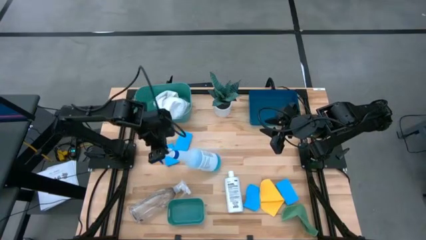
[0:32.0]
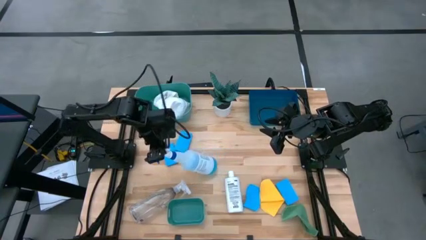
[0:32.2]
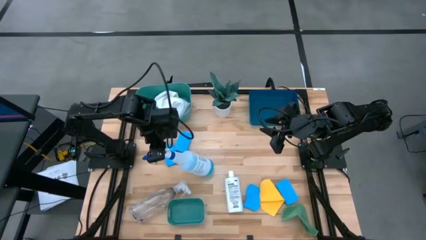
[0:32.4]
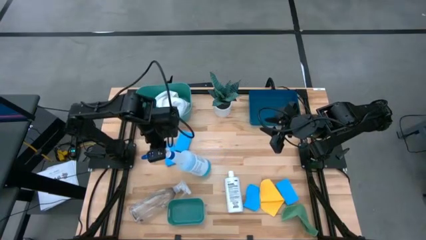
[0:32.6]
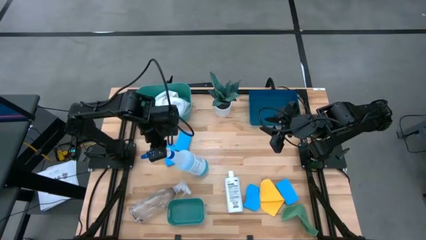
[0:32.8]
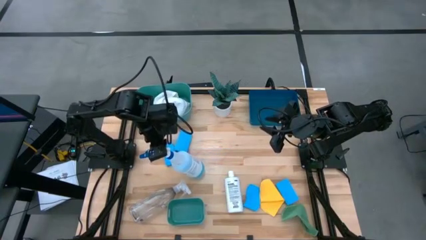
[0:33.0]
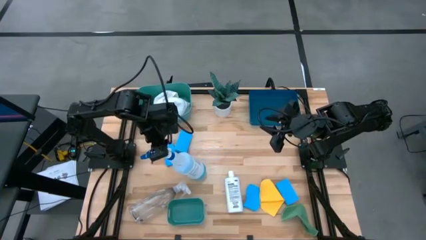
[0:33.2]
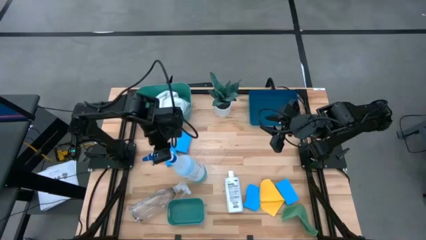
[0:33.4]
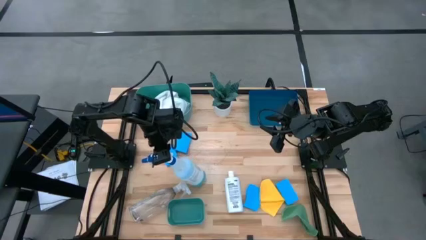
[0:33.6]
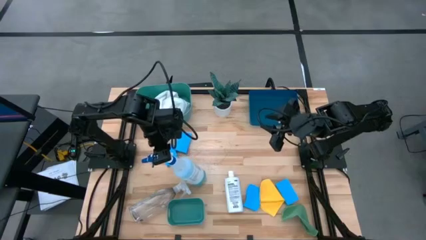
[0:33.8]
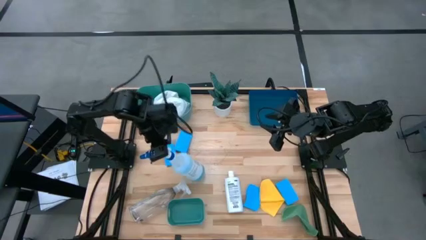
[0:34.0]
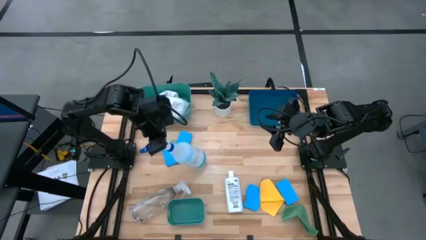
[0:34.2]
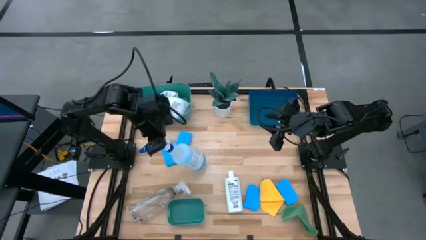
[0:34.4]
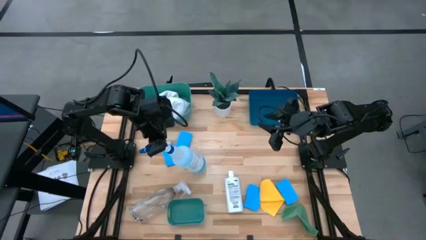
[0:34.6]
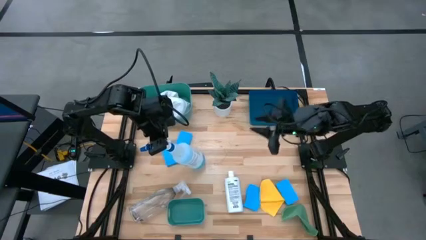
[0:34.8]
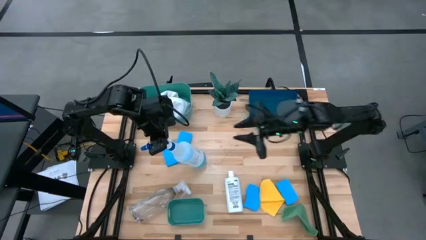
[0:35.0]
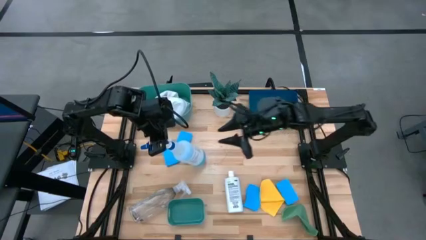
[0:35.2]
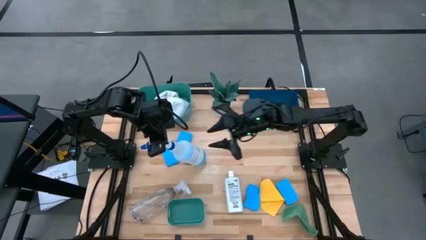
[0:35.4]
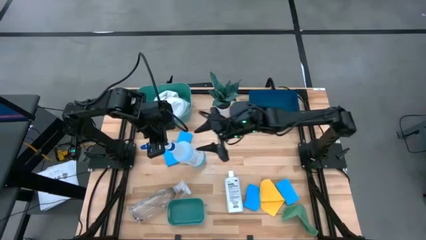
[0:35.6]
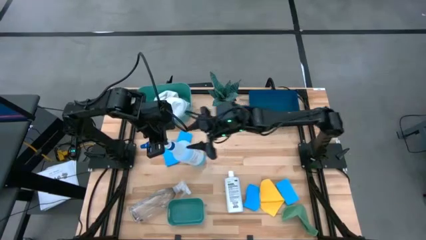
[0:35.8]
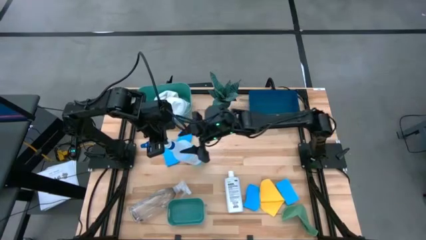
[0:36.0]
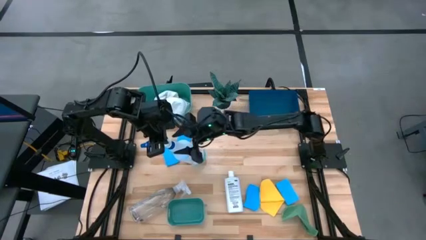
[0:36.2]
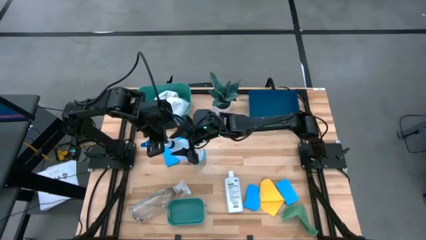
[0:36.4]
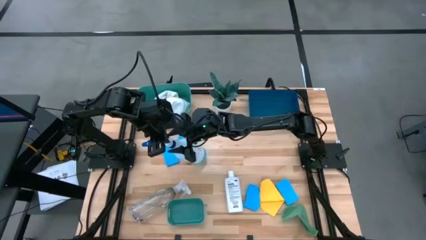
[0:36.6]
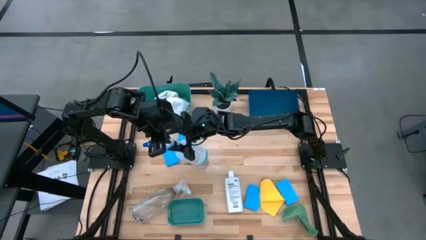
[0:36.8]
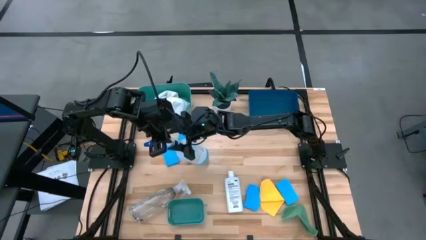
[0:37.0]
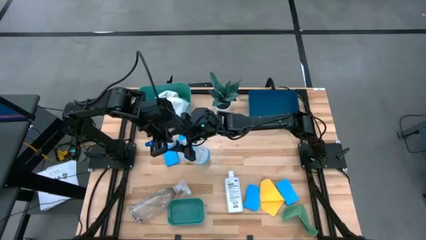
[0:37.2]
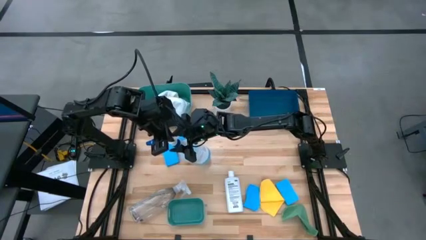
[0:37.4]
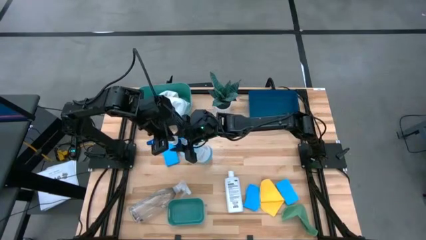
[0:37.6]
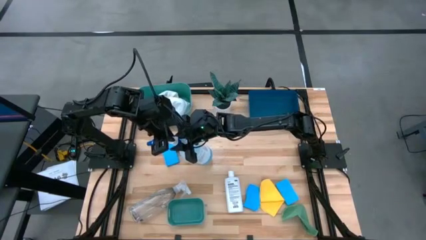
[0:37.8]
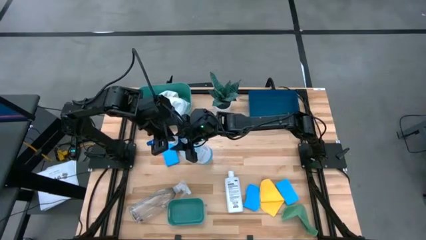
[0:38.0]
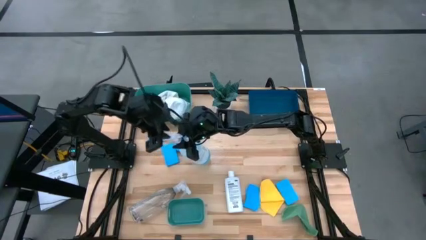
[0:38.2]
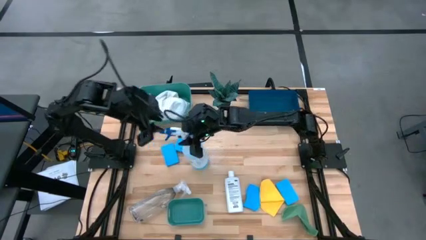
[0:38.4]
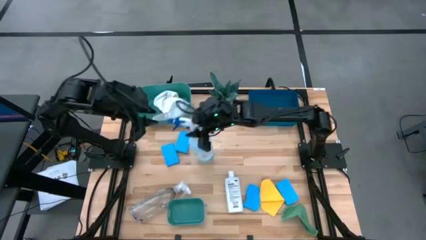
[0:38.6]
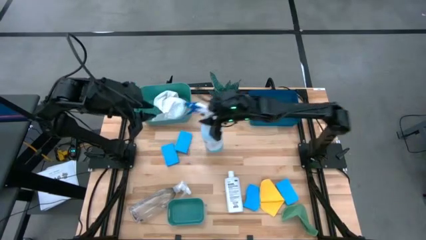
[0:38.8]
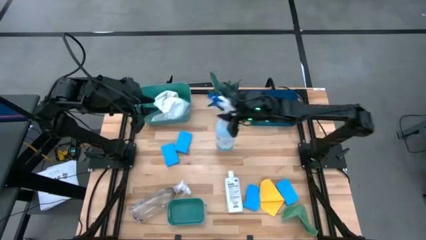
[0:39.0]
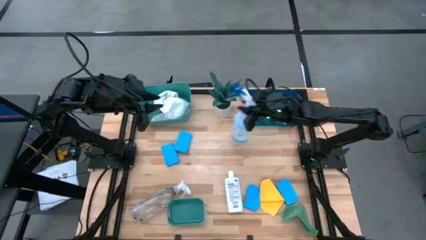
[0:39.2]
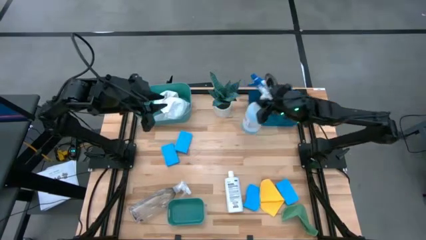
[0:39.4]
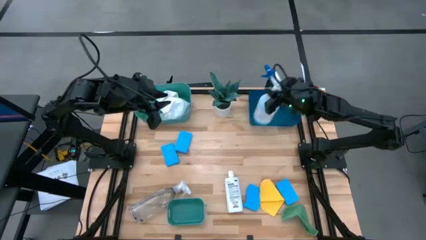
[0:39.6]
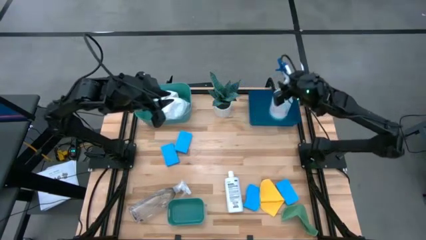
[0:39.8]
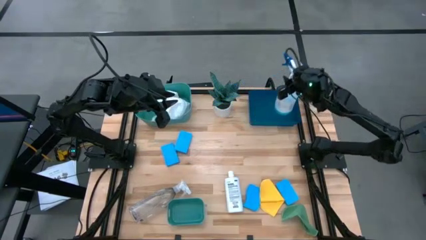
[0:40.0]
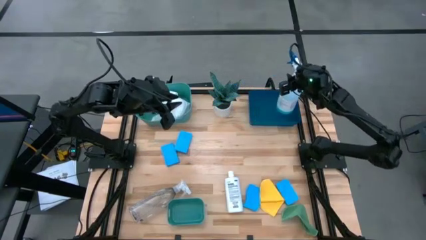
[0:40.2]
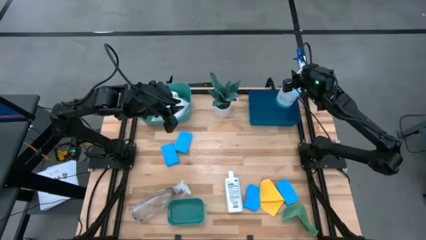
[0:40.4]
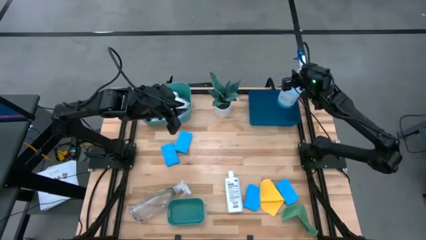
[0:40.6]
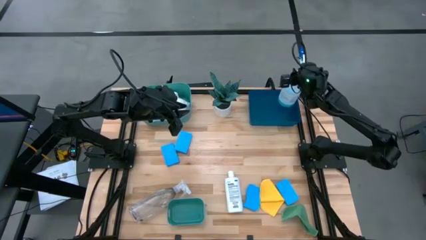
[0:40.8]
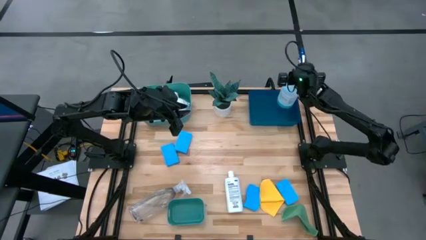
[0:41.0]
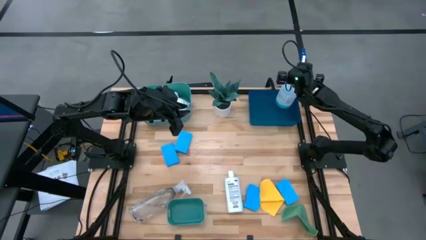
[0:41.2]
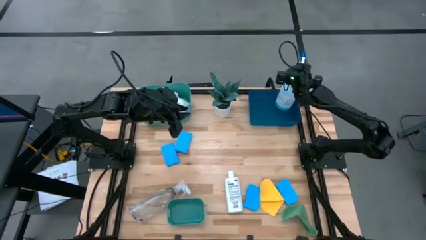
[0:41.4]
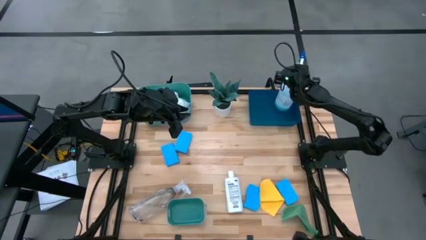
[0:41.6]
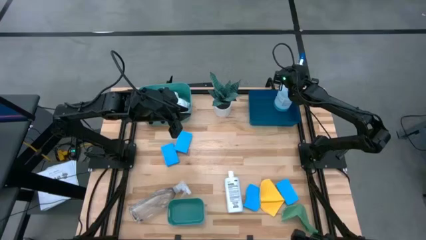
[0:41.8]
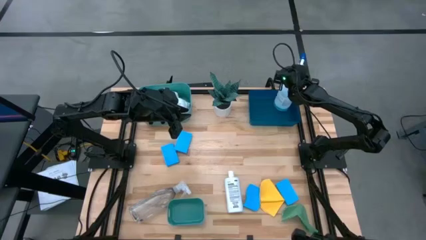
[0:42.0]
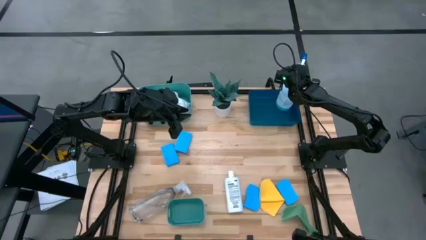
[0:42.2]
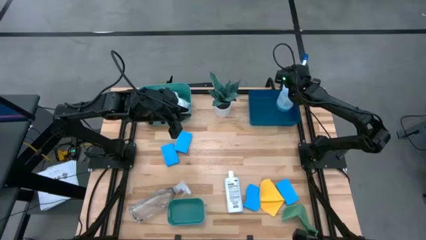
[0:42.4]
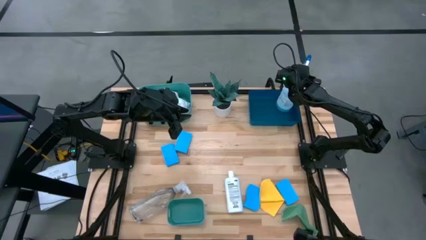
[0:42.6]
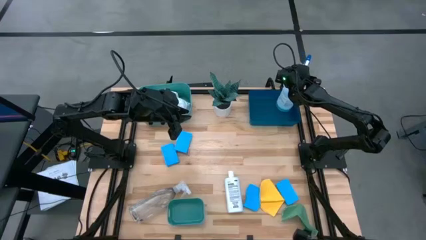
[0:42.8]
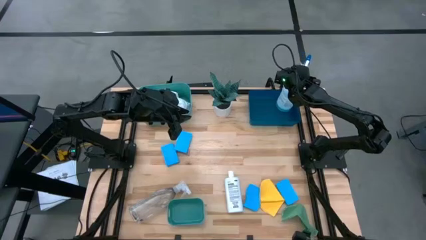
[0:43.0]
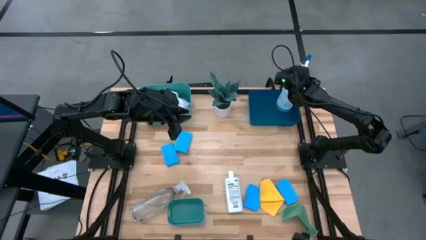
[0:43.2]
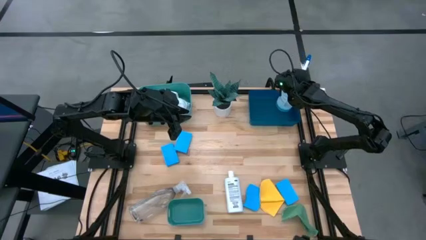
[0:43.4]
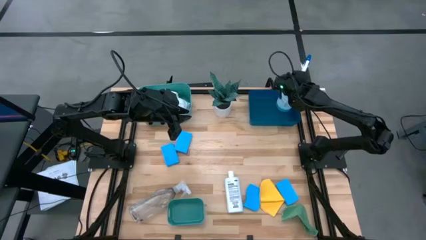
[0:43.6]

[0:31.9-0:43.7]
Task: Pick & Place Kitchen Items
Put the white spray bottle into the blue bin

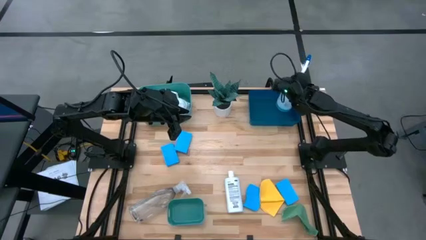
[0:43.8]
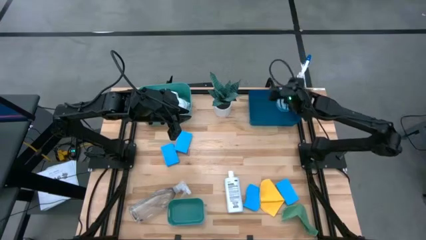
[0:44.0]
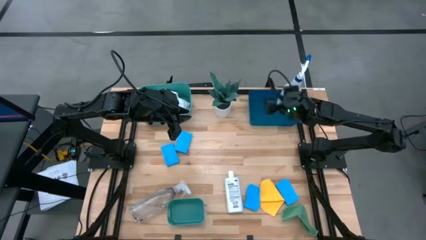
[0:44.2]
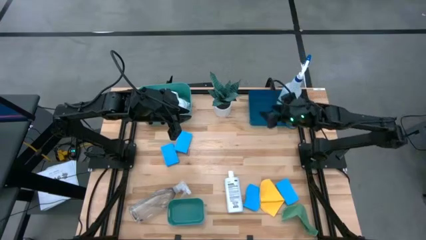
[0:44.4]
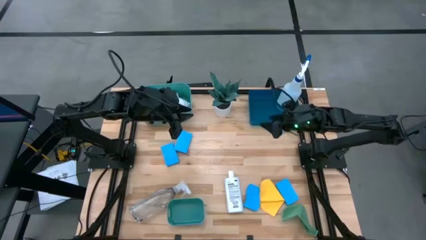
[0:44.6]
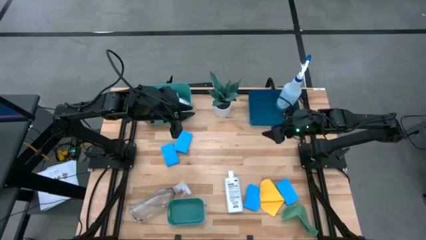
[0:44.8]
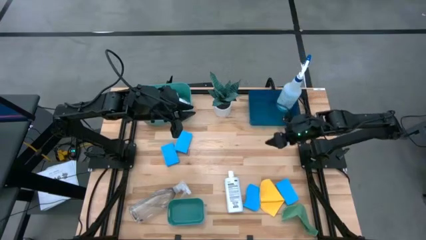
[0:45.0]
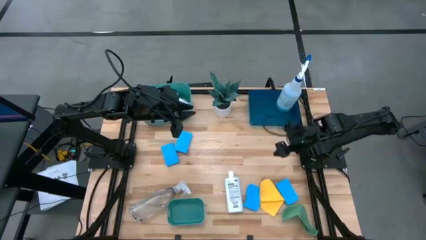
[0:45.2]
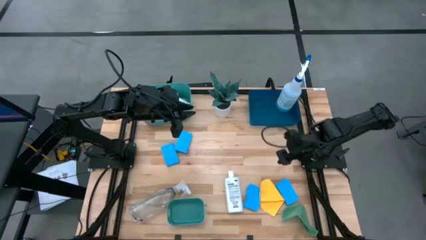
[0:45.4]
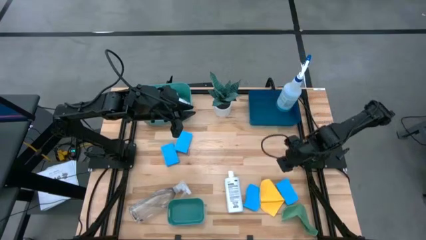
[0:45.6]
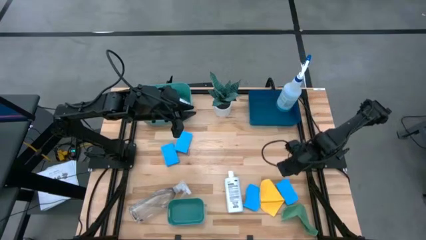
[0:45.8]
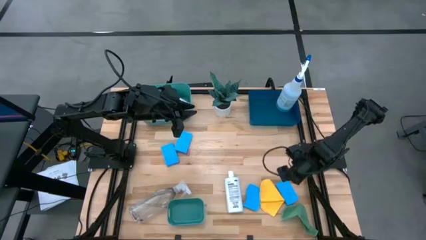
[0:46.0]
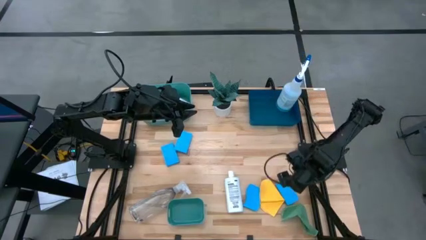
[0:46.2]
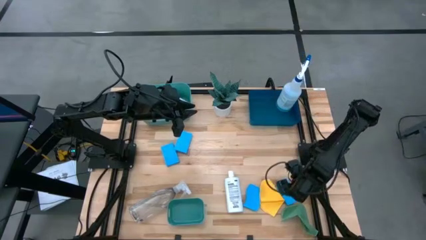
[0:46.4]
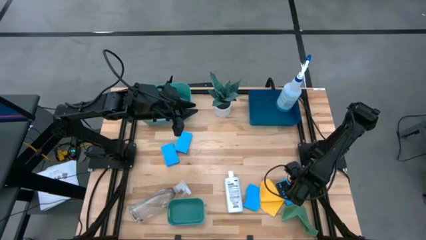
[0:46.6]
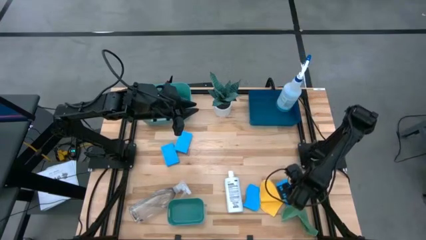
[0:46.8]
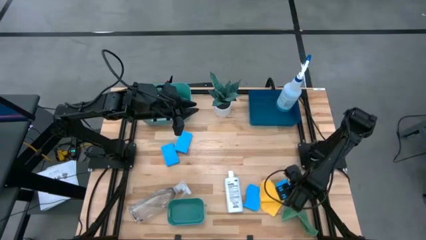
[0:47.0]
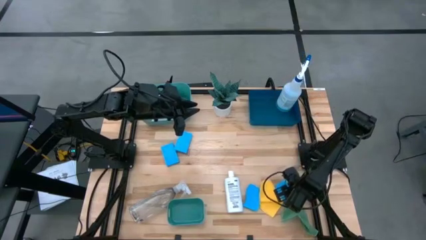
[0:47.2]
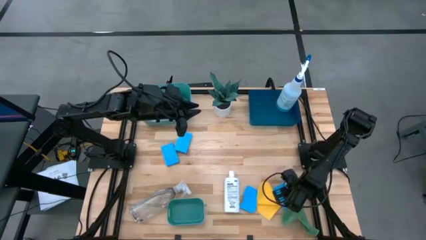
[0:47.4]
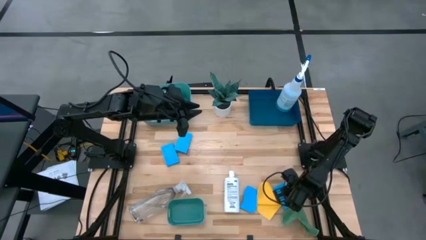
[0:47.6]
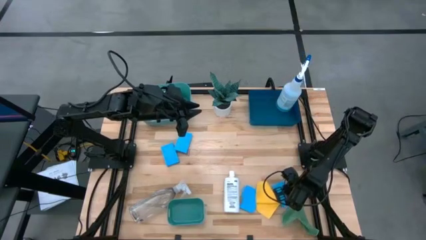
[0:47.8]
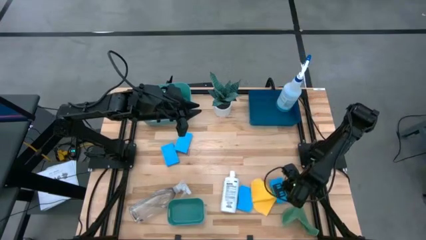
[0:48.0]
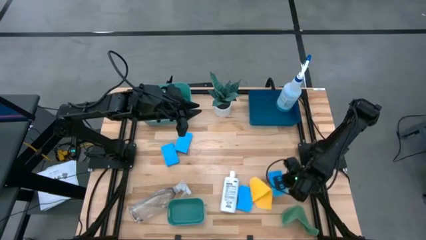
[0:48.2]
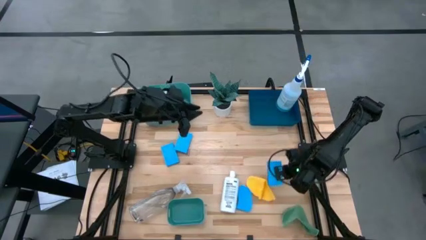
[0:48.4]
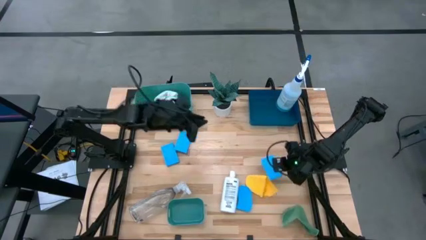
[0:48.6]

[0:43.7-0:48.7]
Put the blue sponge into the bottom green bin

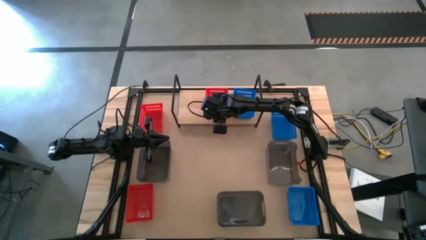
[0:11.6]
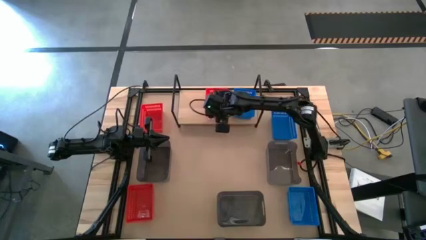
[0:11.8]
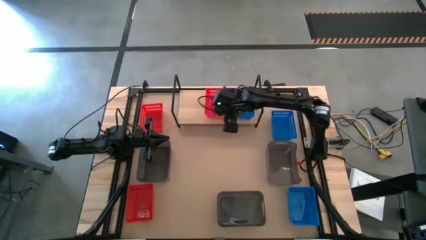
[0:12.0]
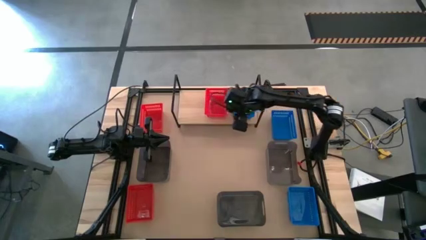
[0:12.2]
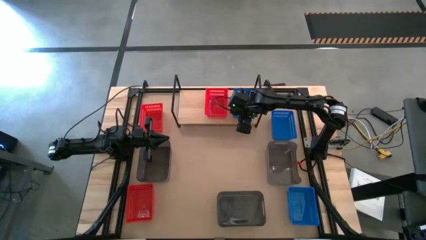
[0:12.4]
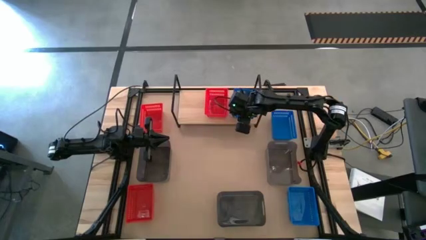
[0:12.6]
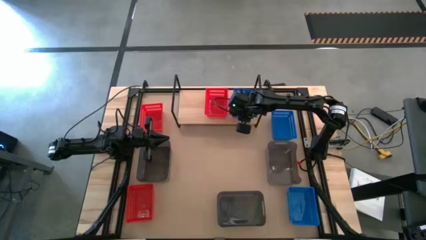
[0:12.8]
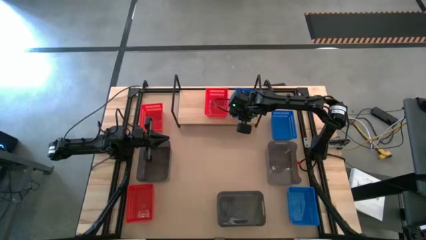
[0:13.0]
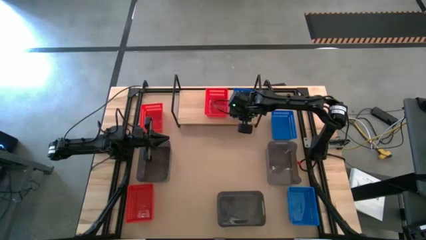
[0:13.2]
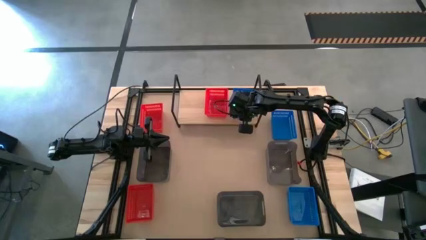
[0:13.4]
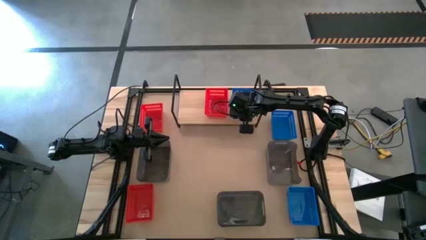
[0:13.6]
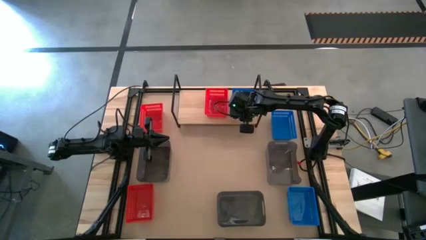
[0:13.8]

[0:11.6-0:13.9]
Task: Stack baskets on shelf by color
Adjust the blue bin on the shelf
